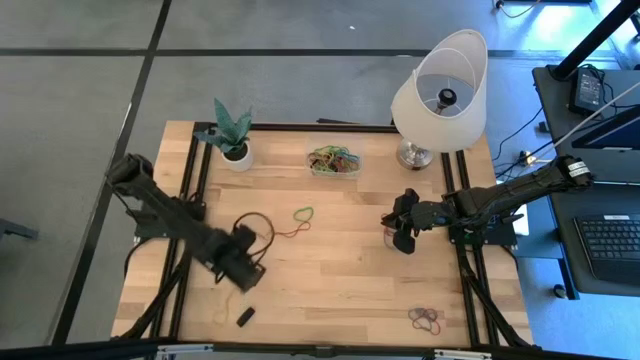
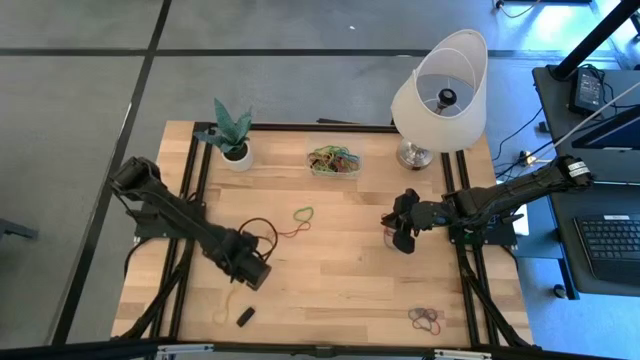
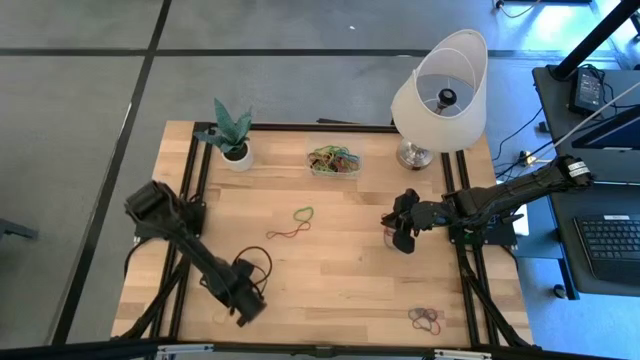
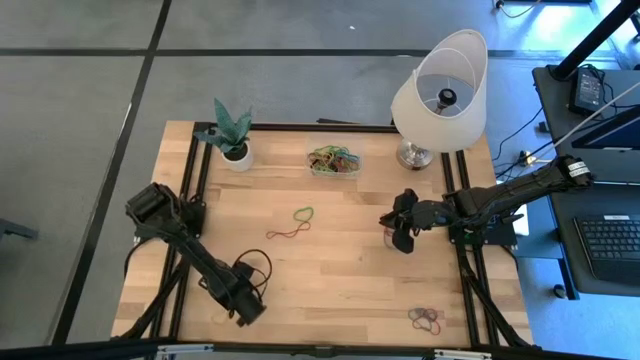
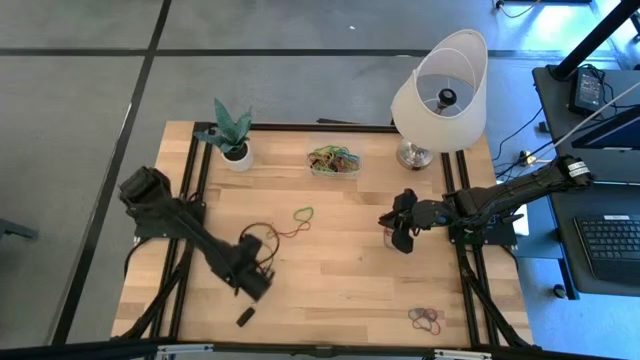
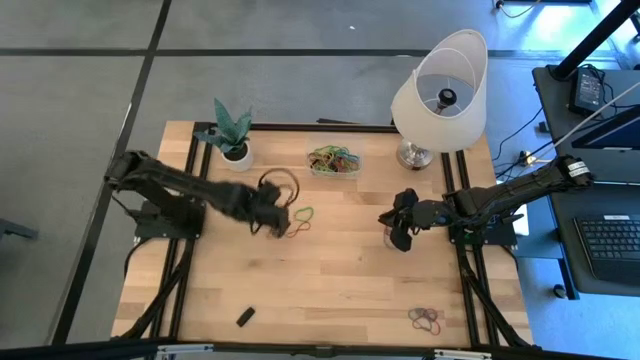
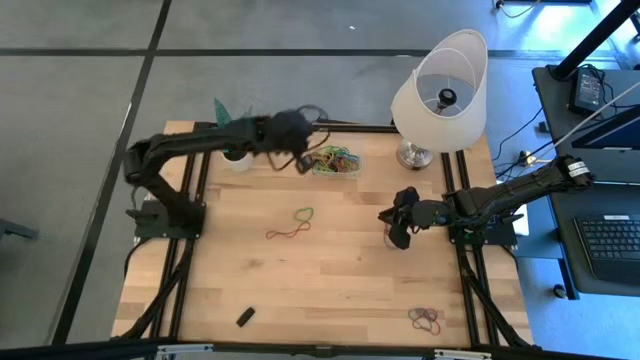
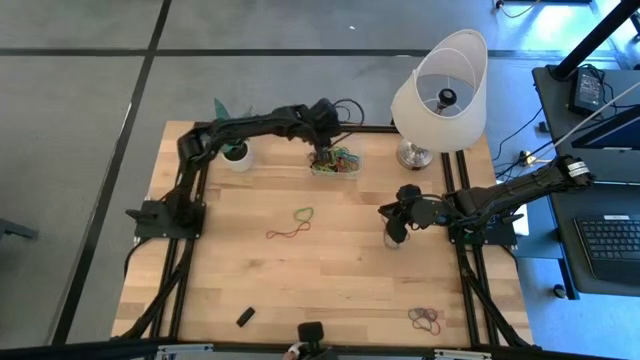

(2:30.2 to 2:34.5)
Task: Pick and place rubber bands into bin
Put the yellow rubber band into the transparent bin

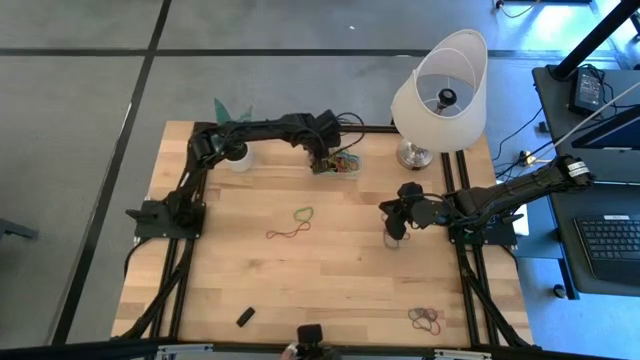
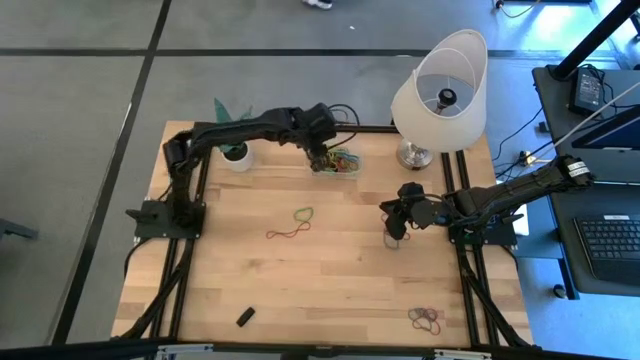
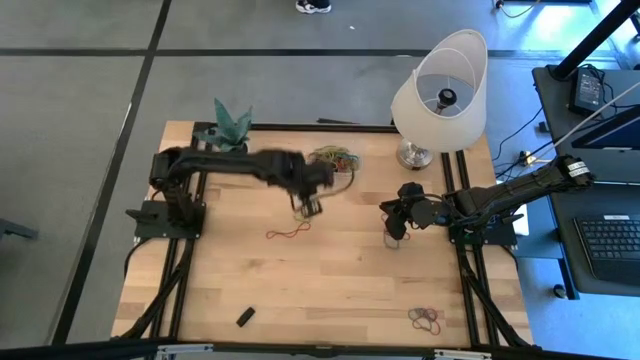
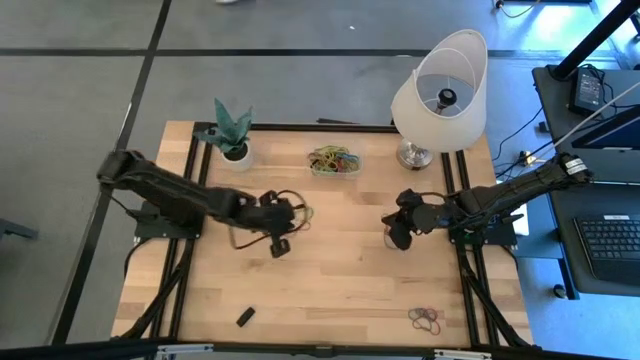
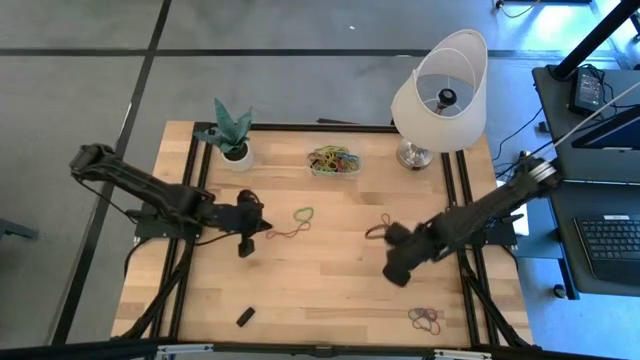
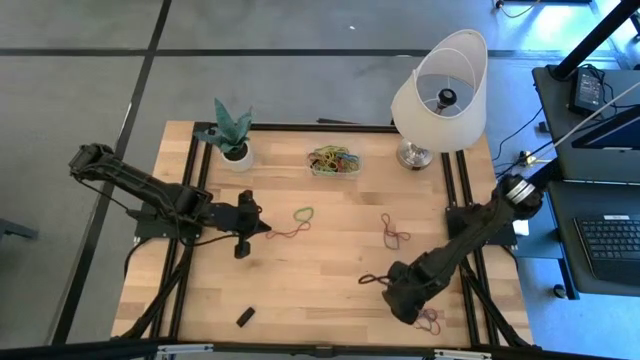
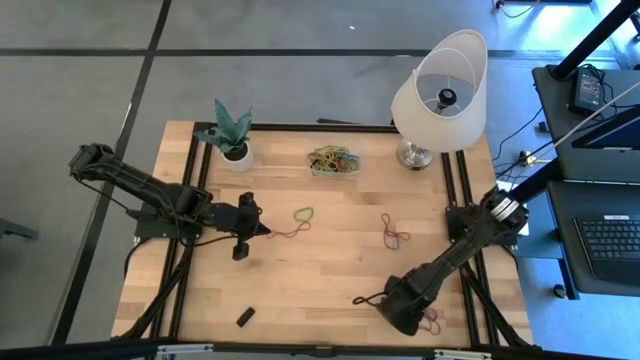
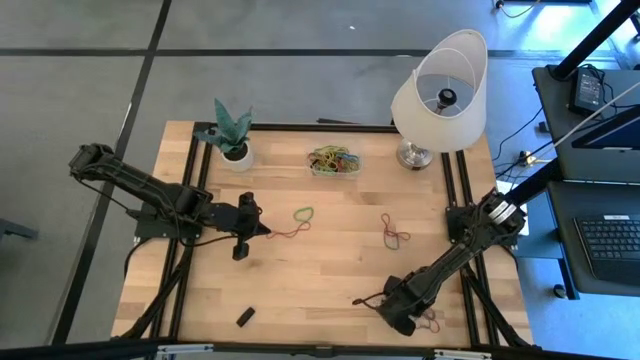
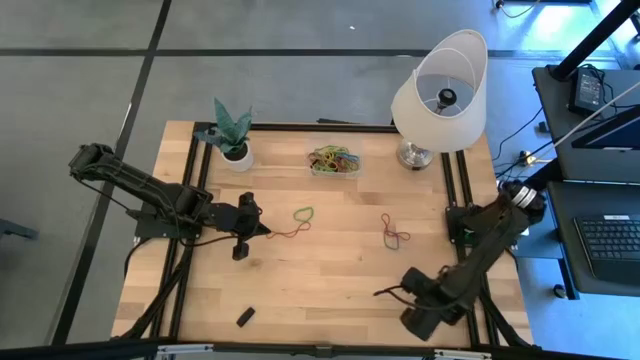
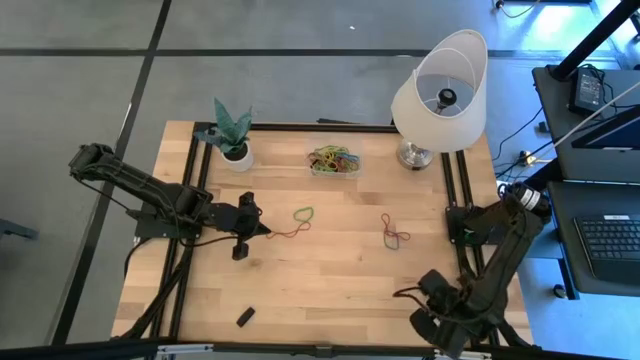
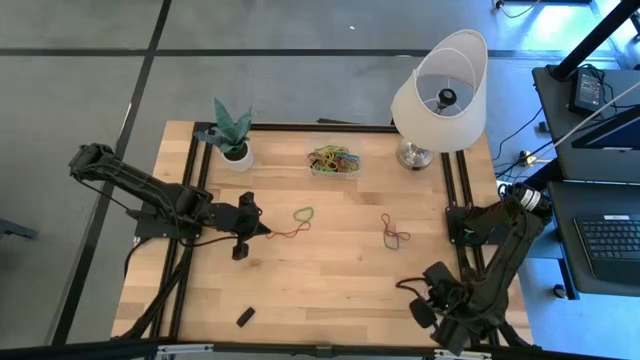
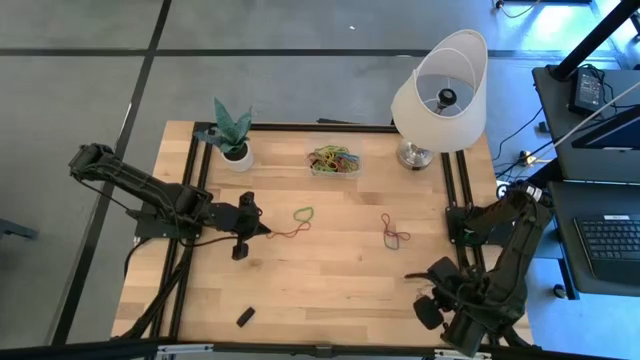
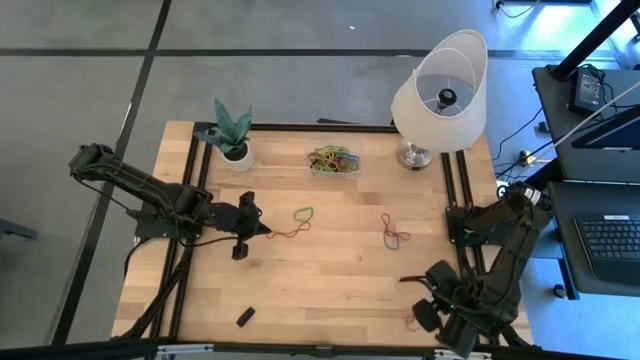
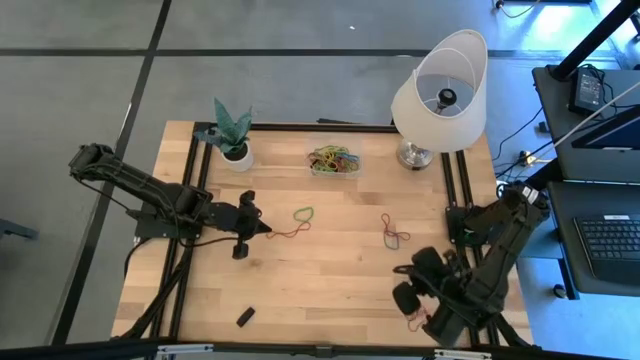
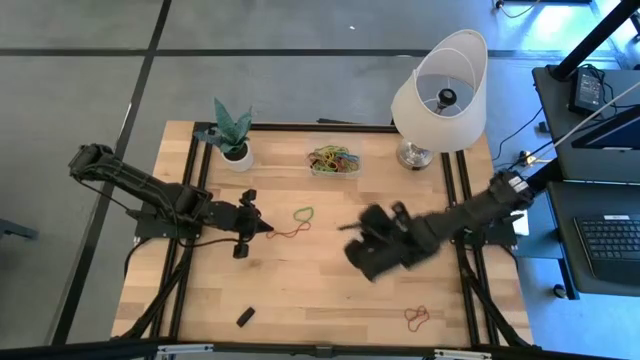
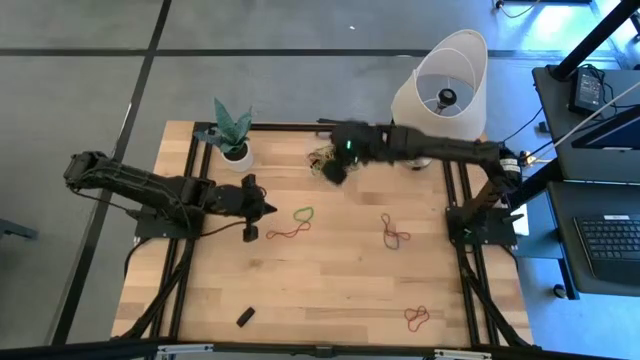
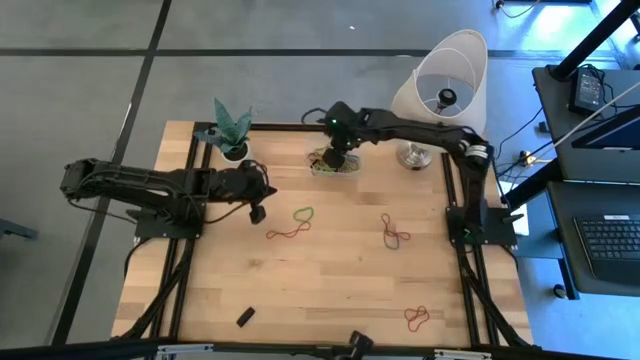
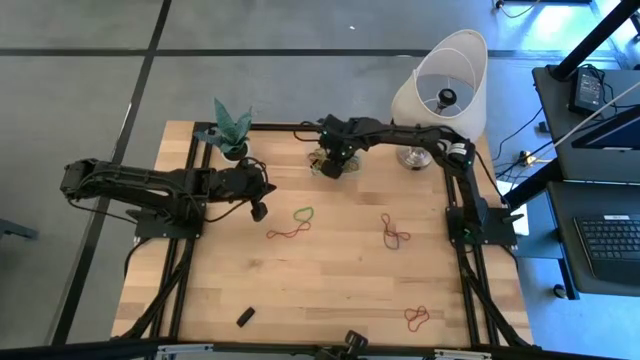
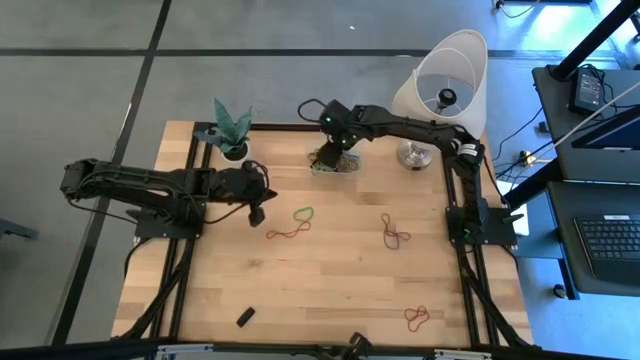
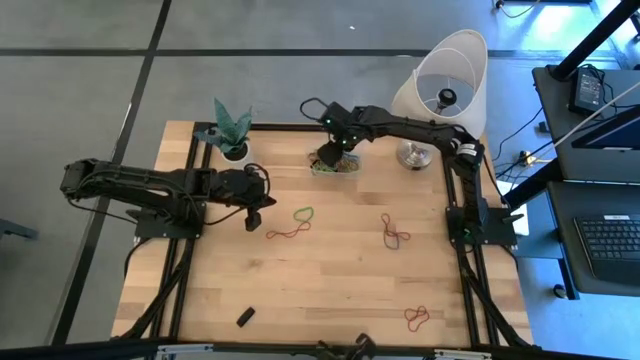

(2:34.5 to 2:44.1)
Put the blue rubber band into the transparent bin

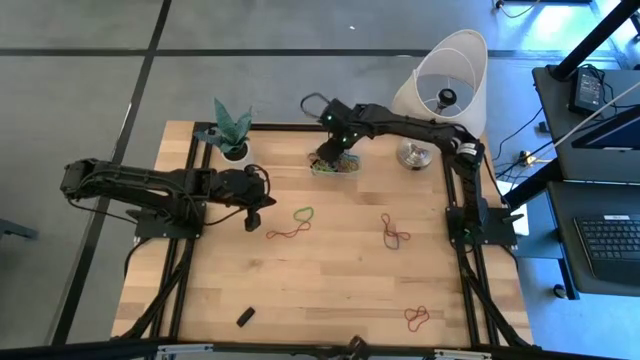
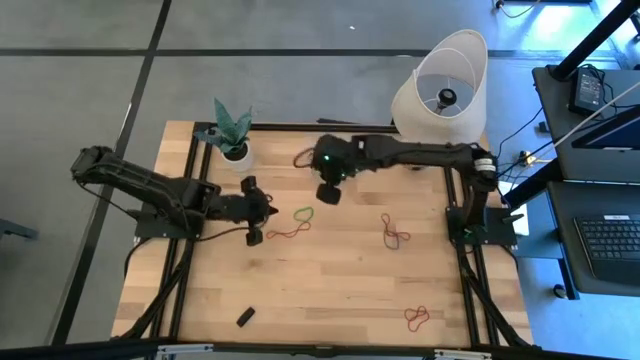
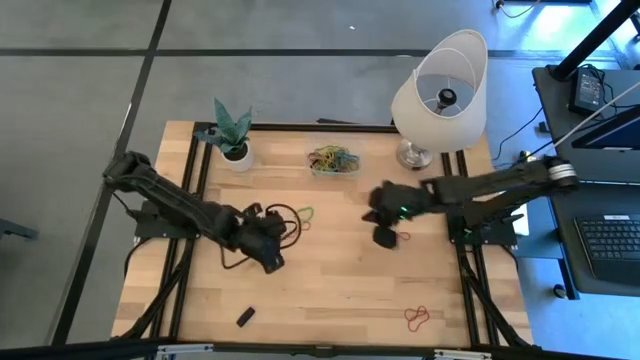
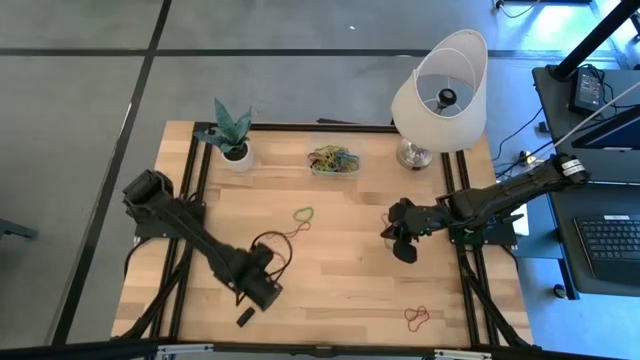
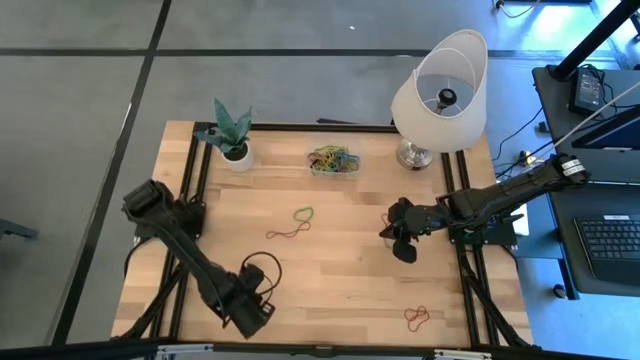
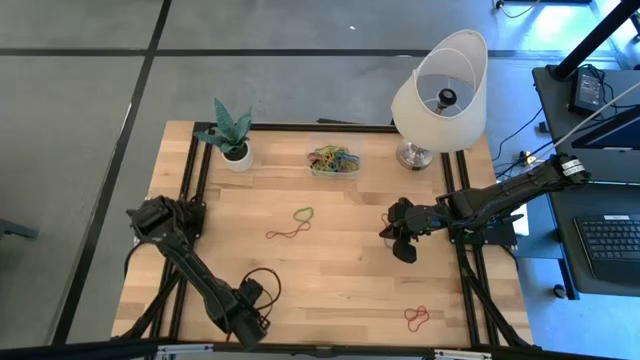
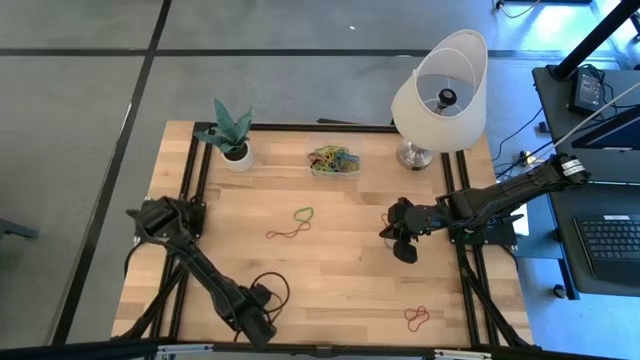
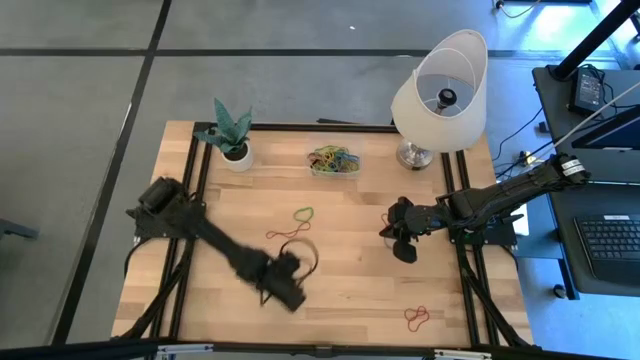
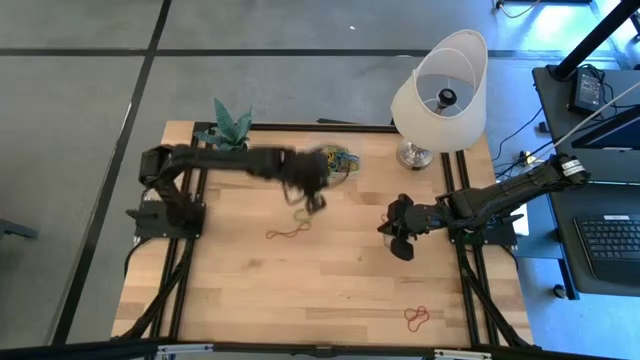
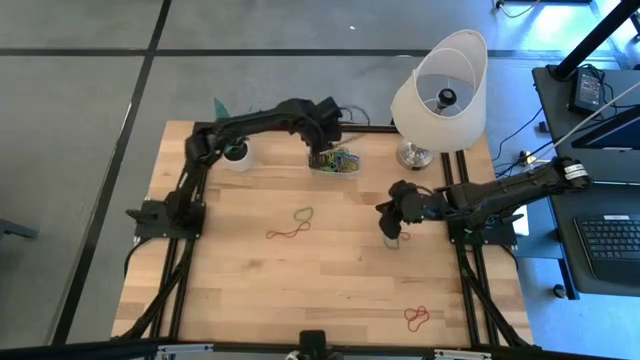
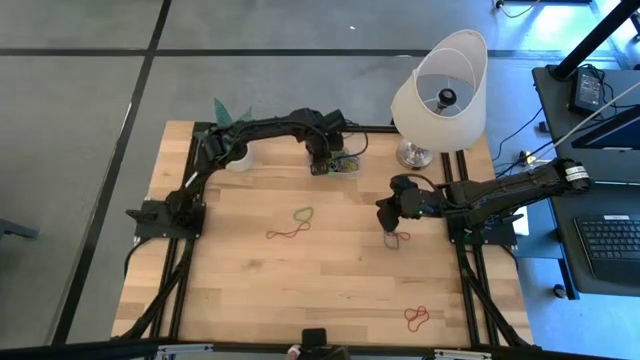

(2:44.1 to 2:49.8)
Put the black rubber band into the transparent bin
